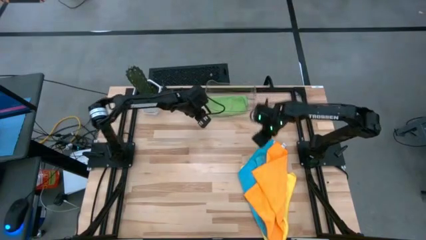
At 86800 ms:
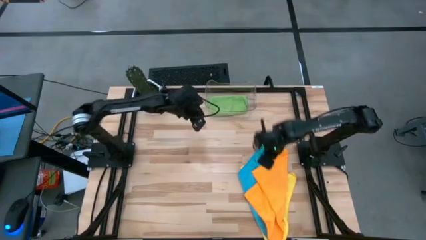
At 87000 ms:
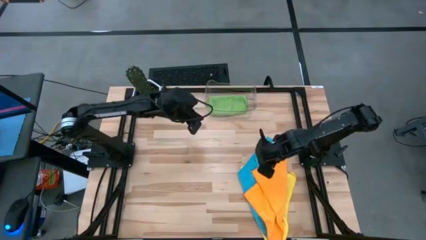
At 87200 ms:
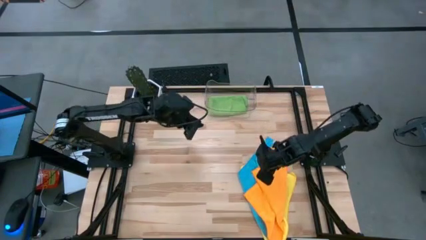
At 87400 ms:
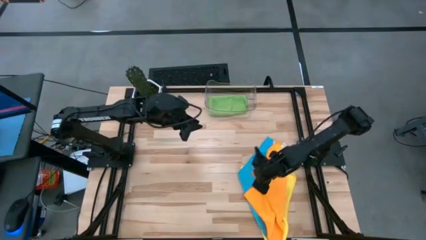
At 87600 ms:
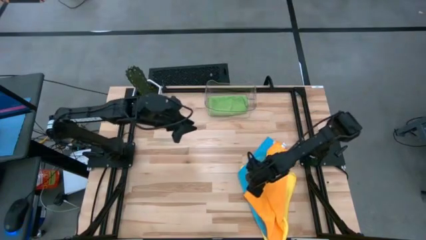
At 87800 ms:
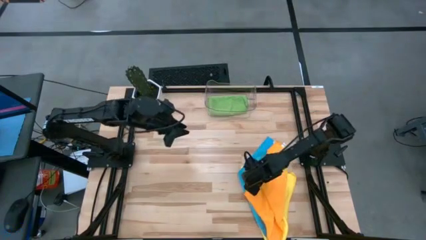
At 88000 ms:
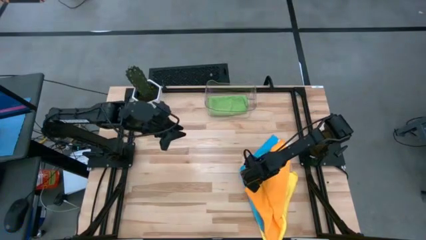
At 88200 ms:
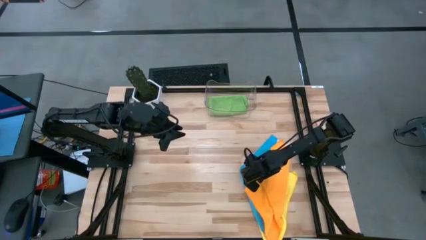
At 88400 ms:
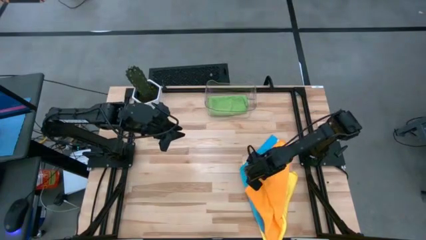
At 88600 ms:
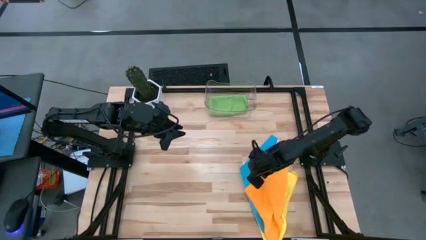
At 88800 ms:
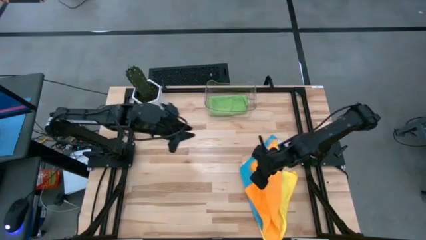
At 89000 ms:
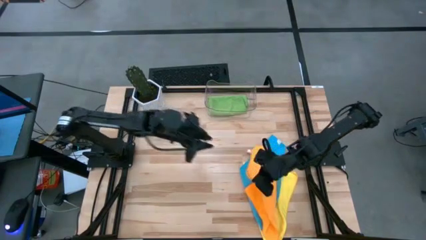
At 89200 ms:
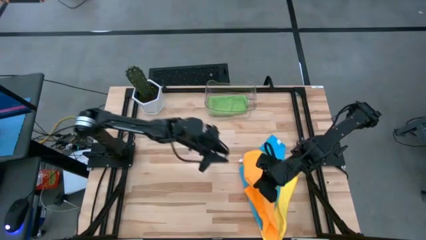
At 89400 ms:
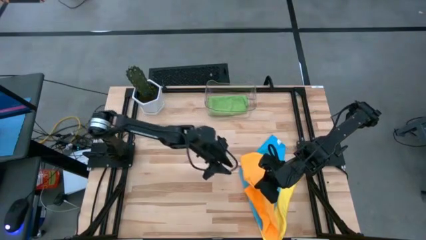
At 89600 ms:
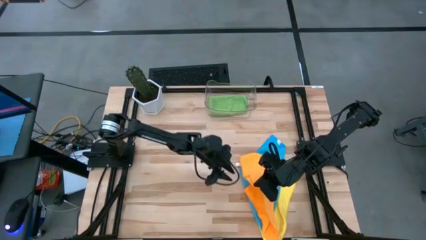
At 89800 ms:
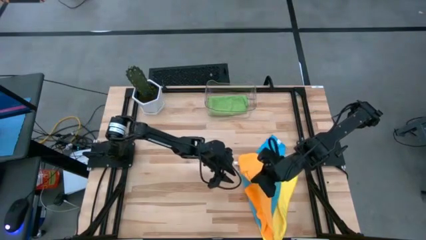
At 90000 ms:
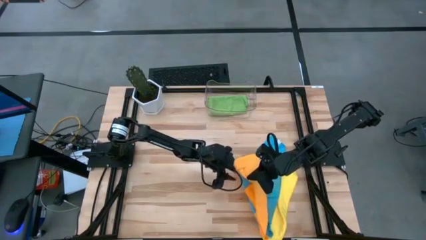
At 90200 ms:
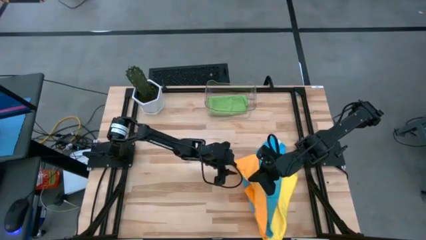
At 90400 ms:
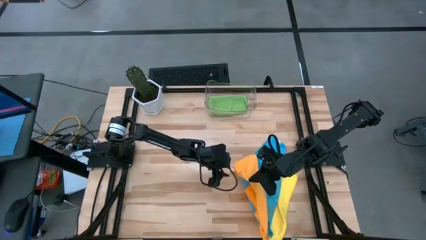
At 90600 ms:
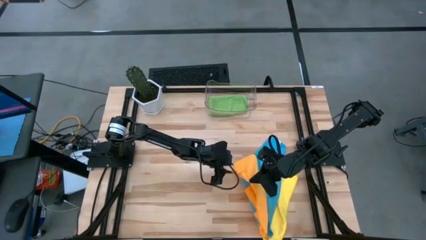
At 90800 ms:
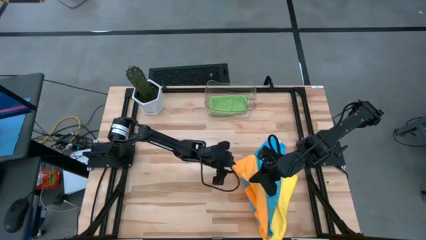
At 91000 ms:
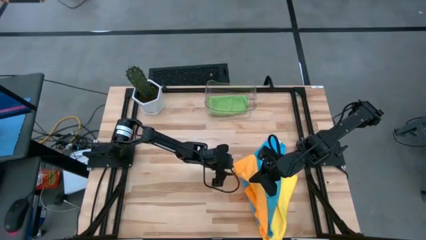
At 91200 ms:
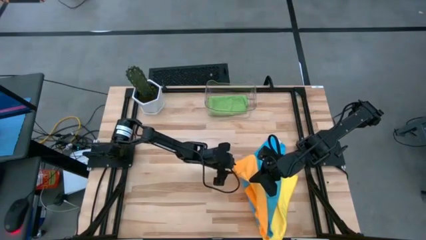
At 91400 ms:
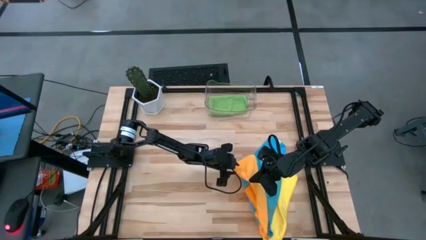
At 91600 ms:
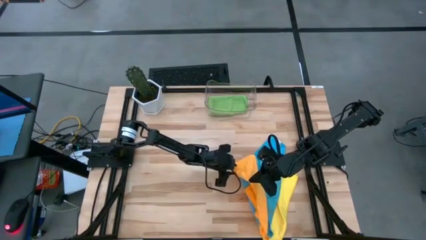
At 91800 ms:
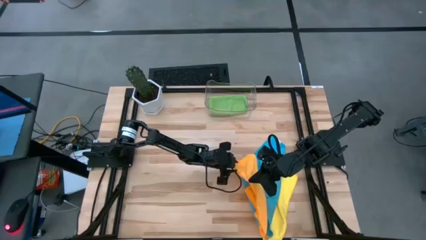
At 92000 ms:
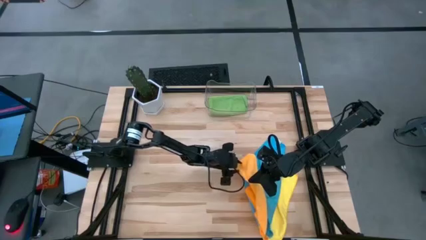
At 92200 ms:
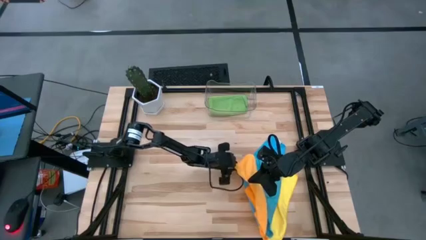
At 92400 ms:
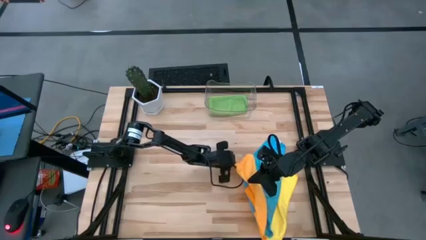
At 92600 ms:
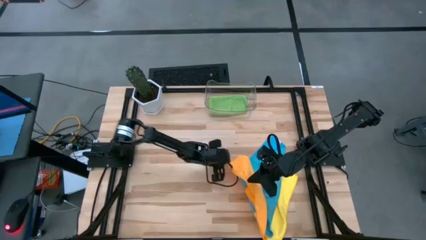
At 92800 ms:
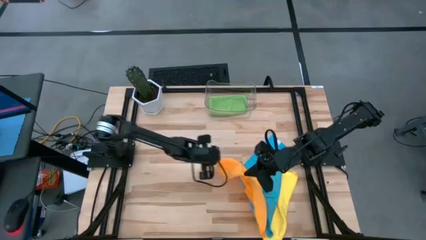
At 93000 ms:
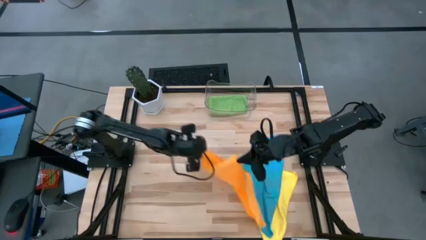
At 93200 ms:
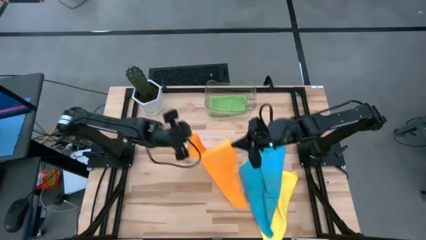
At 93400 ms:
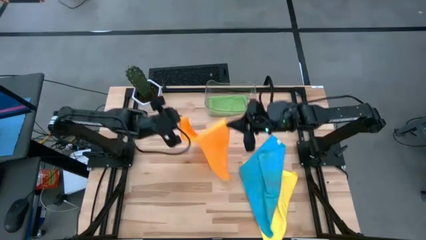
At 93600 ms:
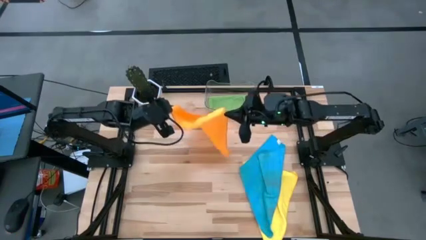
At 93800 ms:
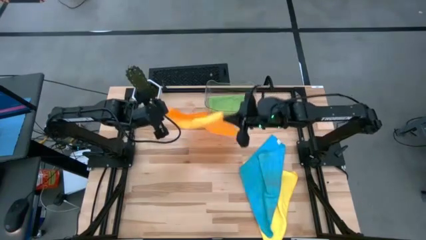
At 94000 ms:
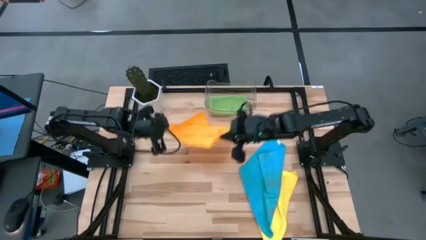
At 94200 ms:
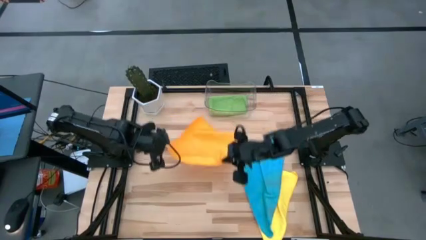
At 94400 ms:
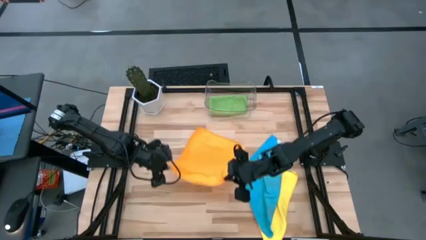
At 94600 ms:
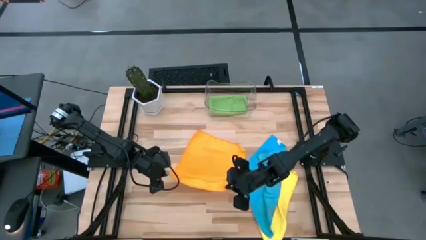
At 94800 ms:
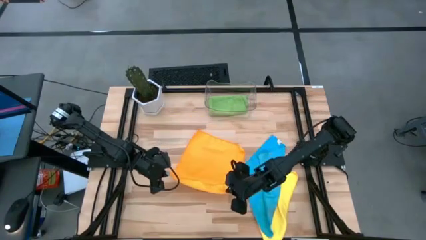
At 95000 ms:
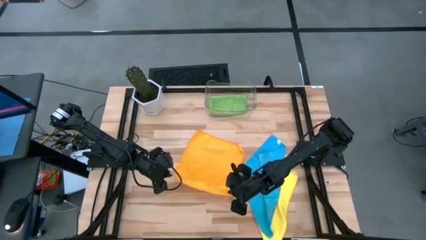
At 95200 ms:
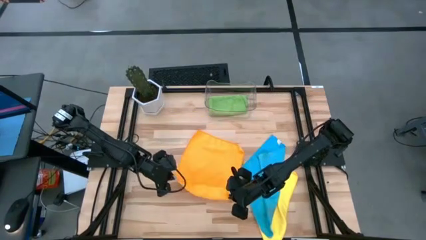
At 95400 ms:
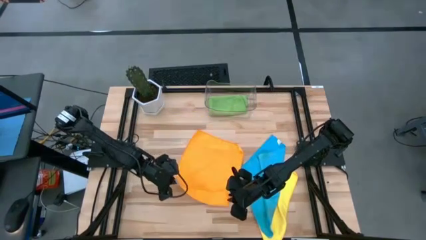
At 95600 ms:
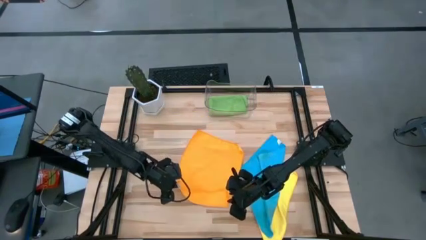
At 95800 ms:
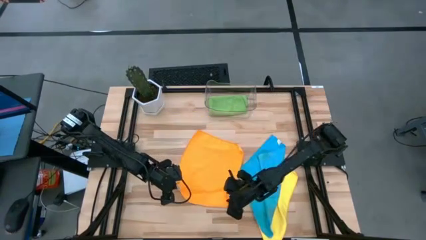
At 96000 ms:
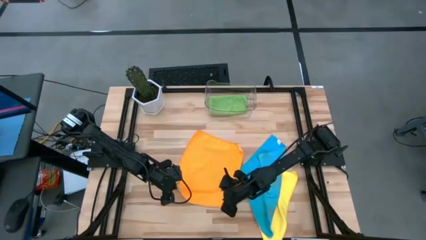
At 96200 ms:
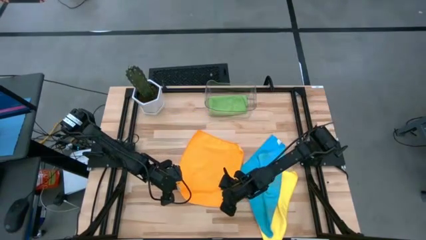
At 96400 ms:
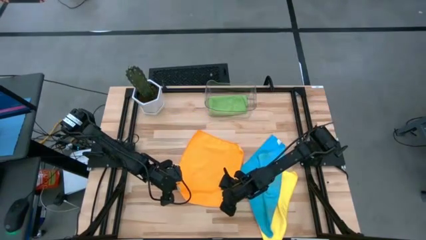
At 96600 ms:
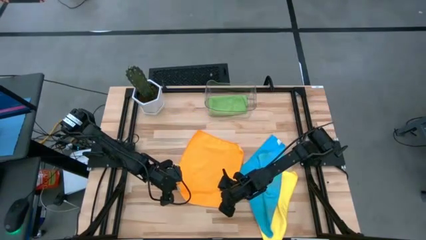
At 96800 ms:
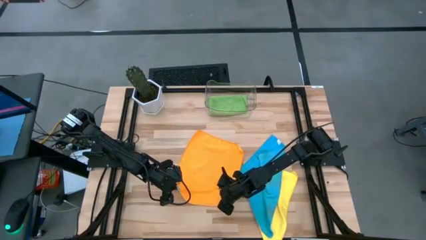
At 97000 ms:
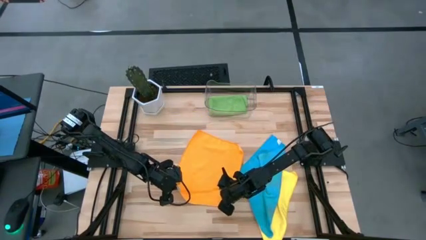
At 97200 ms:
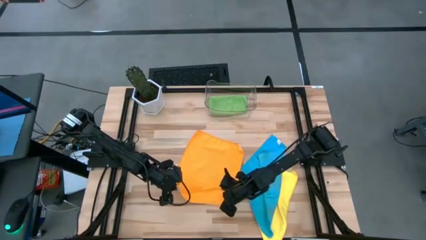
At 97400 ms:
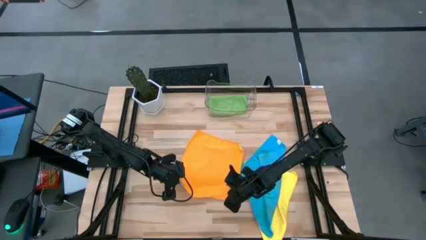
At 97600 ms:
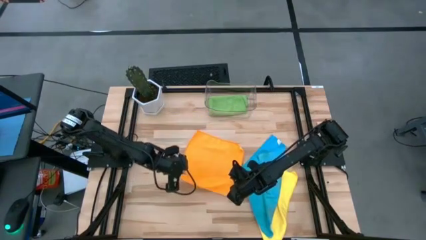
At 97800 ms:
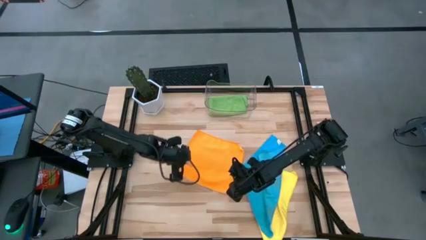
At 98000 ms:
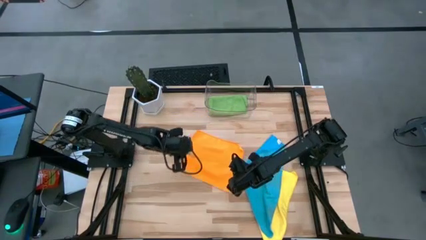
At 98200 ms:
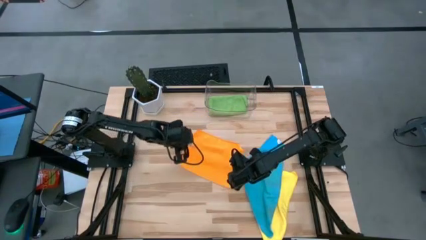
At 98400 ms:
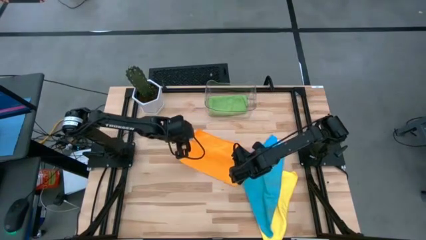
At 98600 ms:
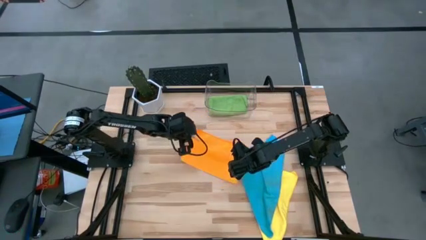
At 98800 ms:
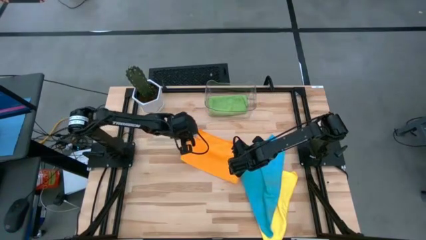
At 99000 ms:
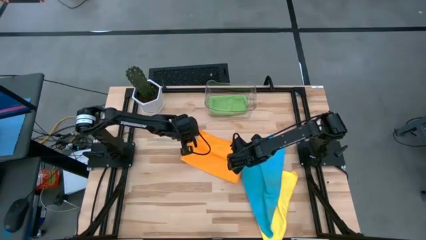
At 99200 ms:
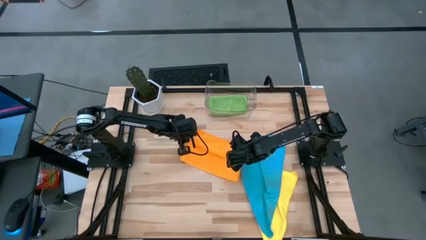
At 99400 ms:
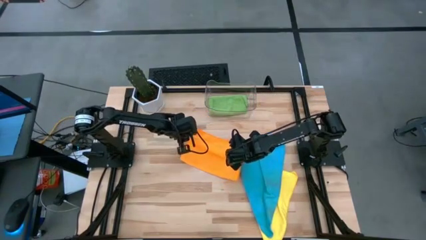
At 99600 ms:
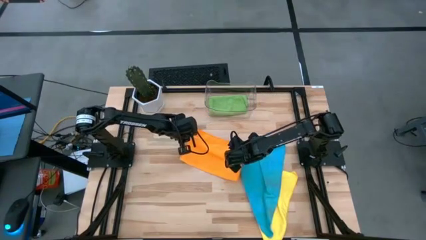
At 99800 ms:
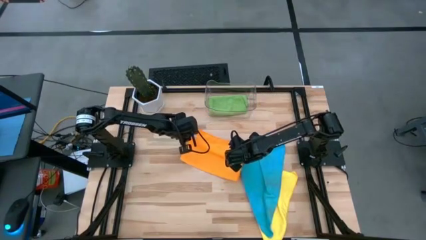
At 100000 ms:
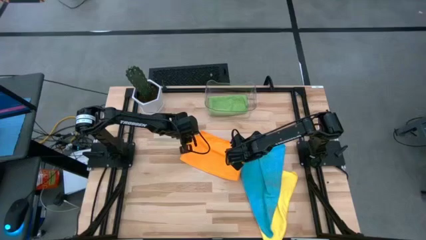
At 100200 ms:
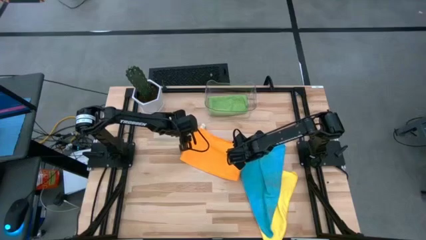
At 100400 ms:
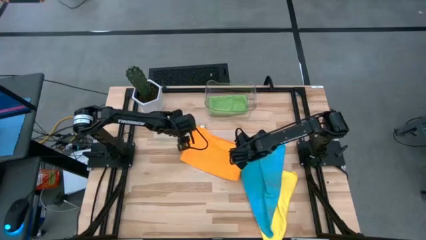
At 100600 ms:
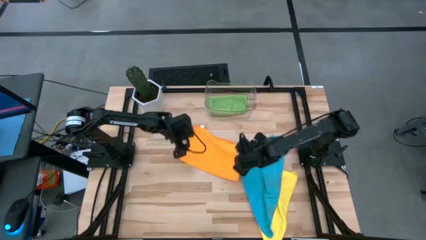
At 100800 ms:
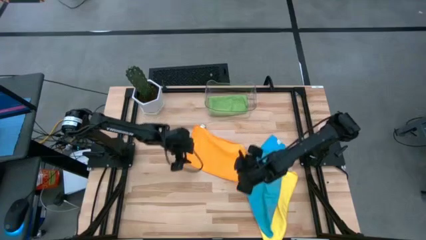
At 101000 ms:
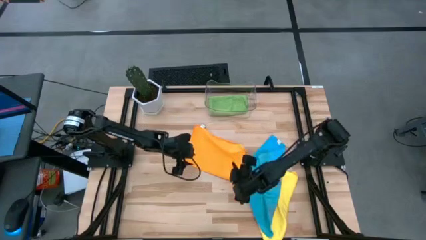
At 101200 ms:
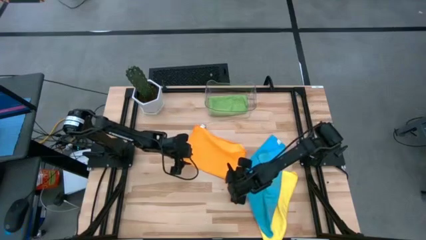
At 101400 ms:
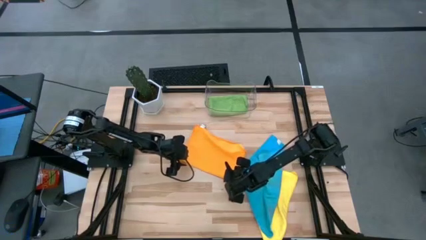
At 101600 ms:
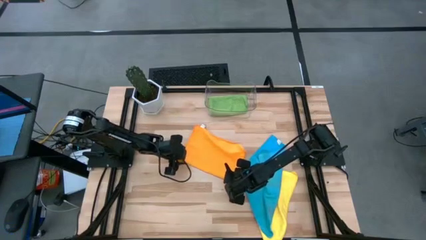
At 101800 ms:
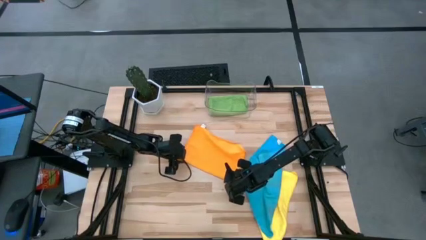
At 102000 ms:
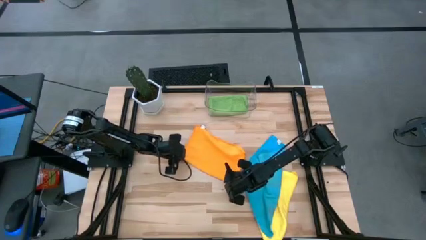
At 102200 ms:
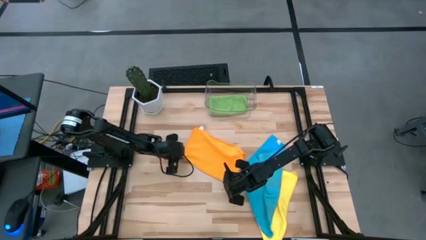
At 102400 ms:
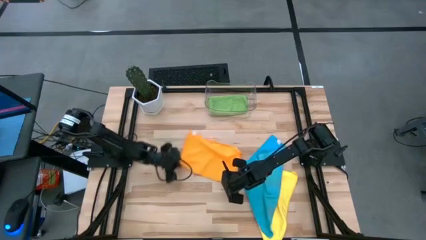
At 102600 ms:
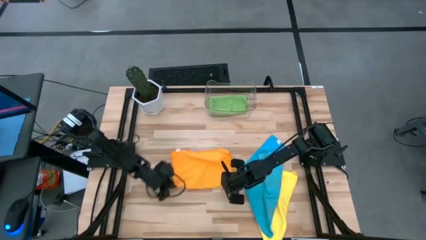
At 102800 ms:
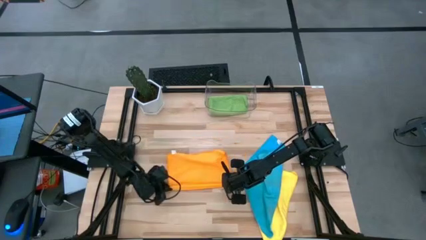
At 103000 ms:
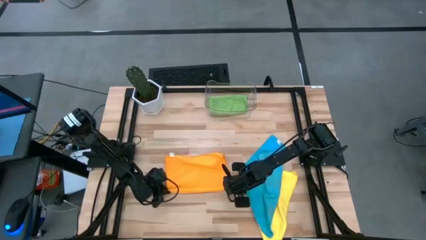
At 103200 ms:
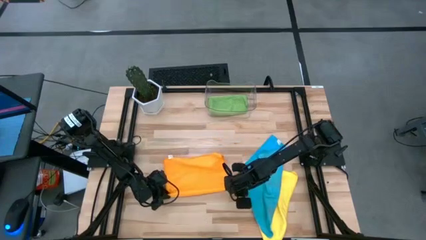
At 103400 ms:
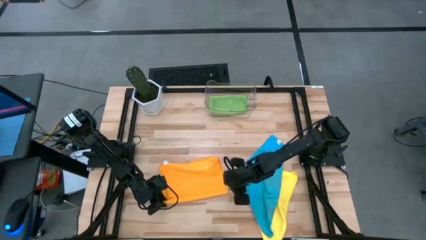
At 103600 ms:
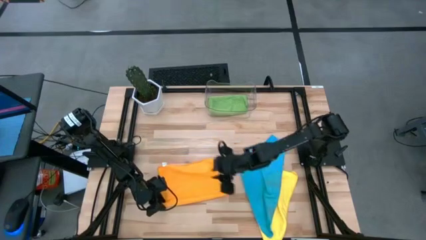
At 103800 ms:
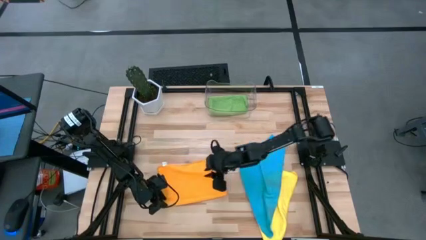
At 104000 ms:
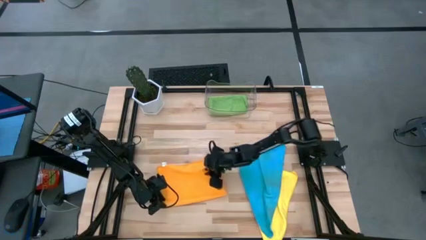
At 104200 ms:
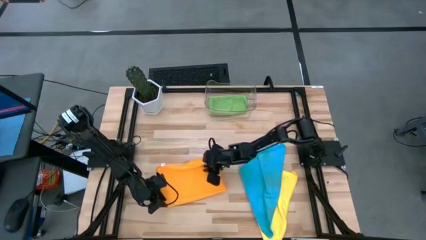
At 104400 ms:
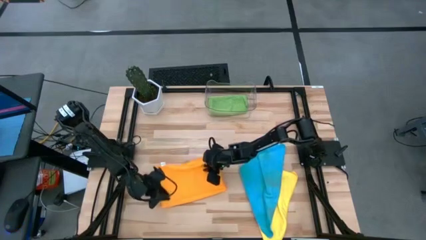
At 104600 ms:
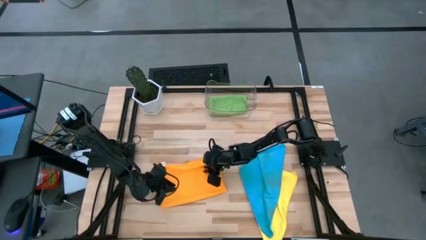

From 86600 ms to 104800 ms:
Task: Fold microfiber towels
Fold the orange towel
